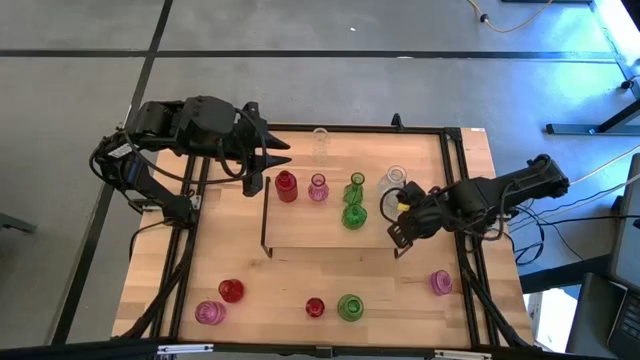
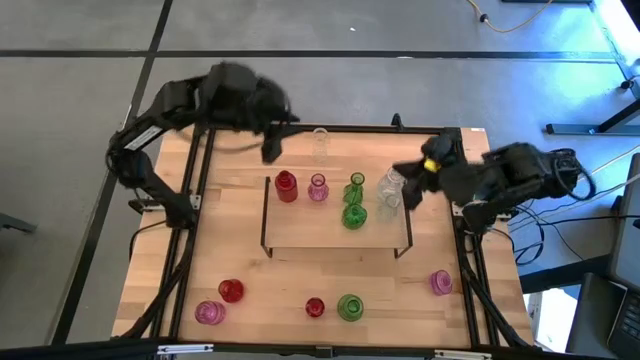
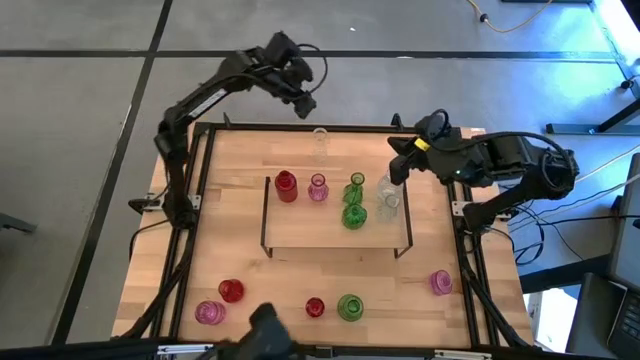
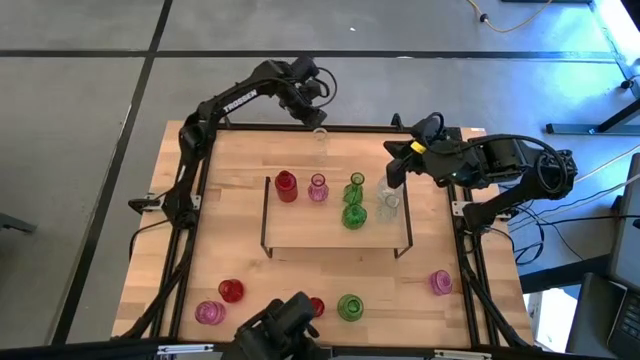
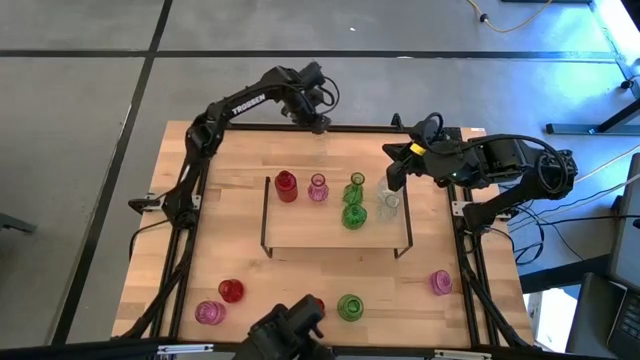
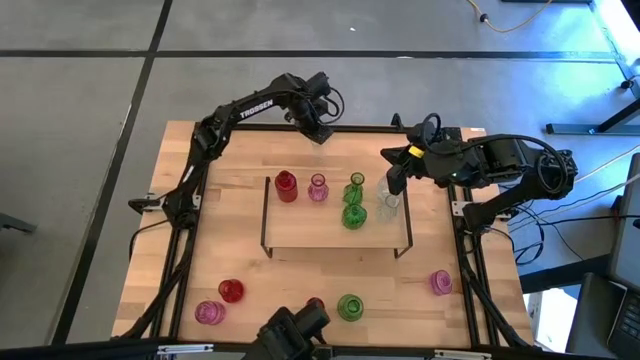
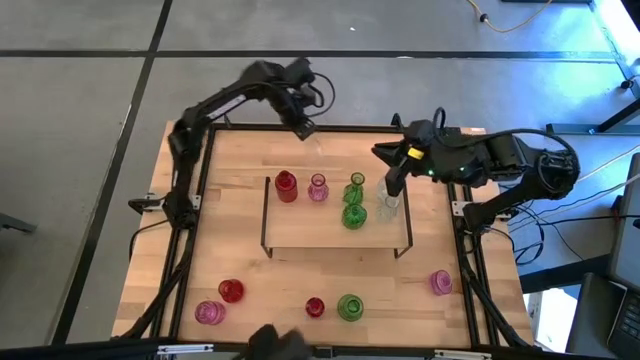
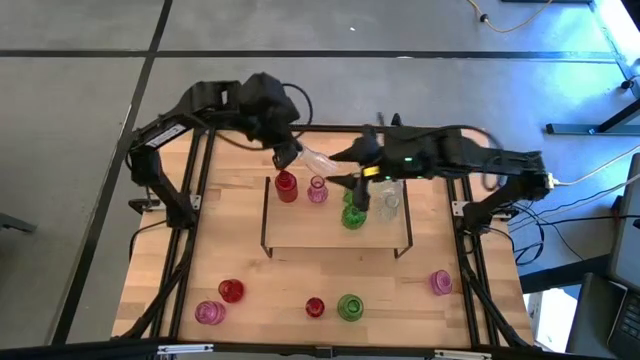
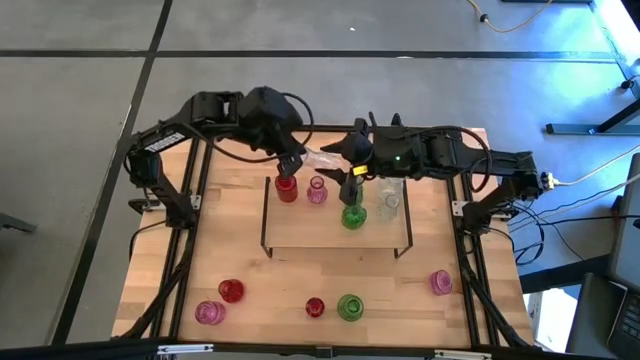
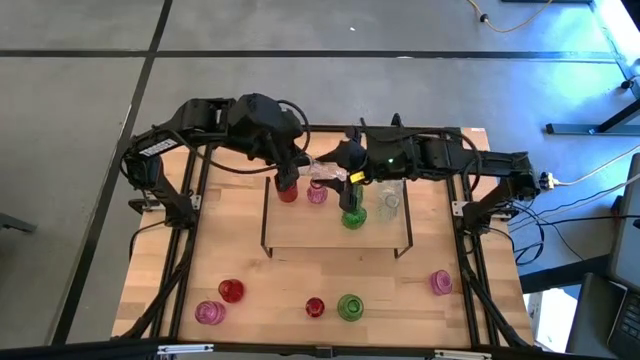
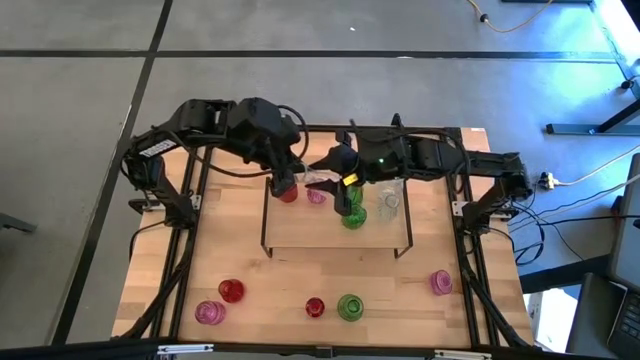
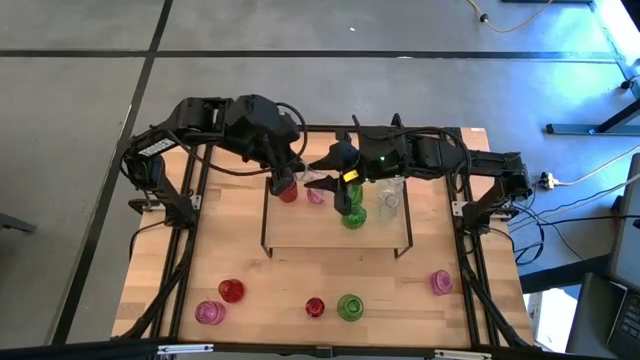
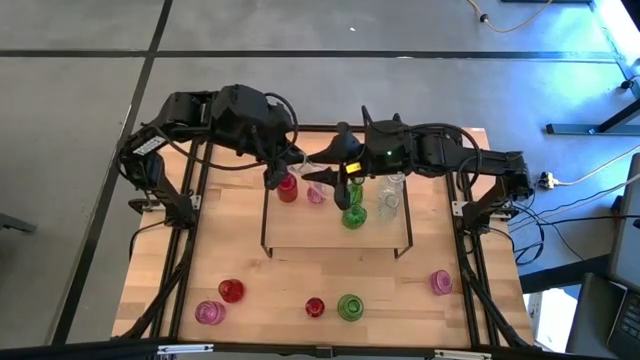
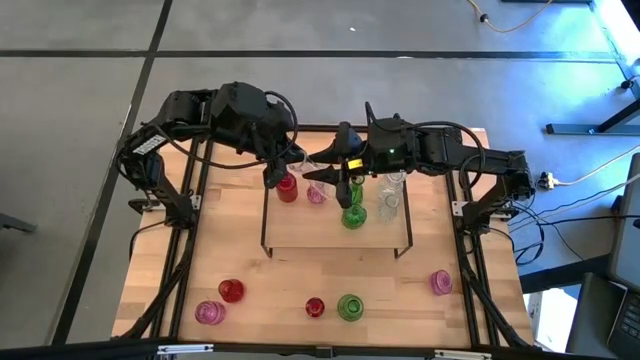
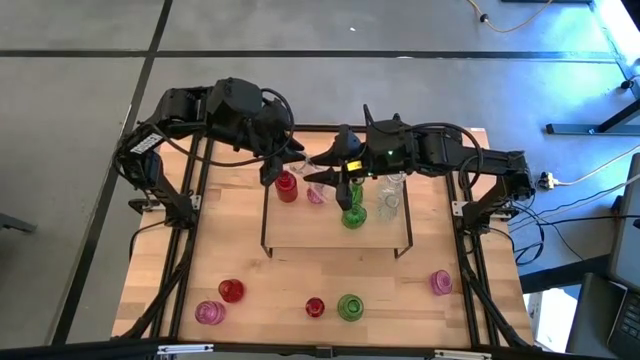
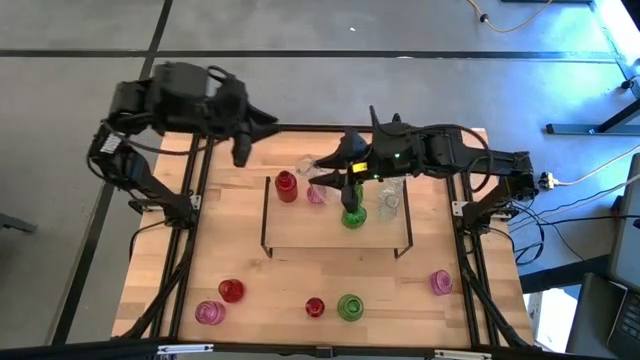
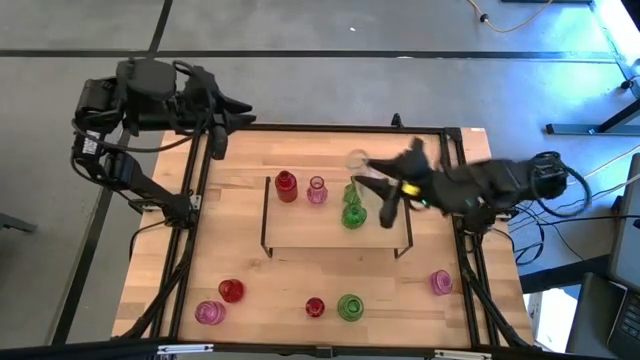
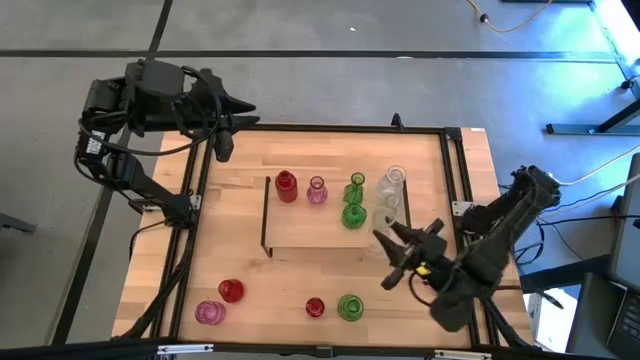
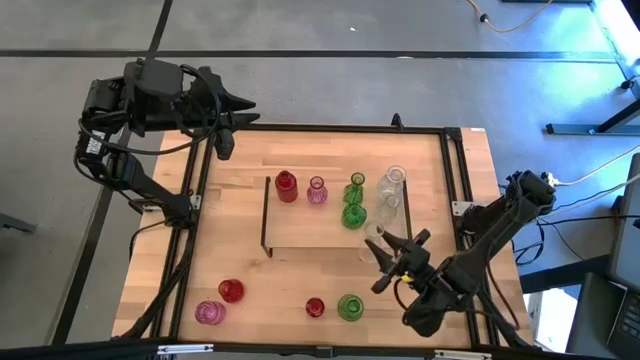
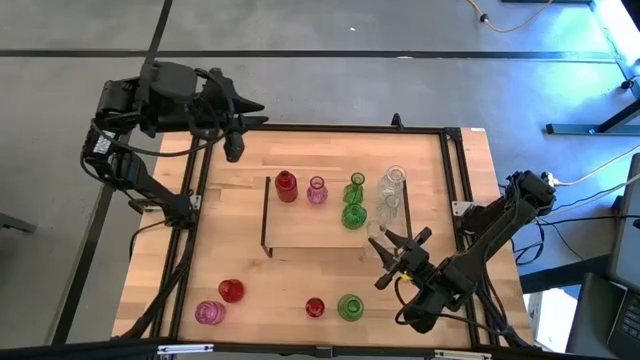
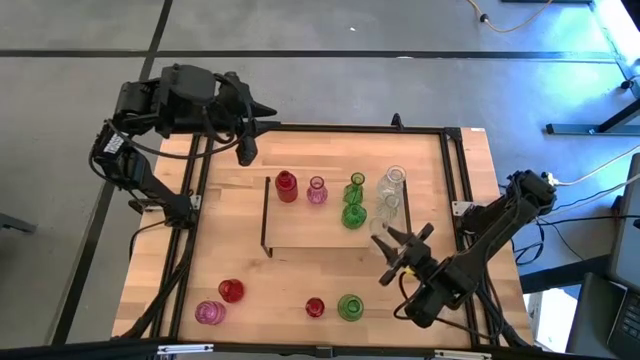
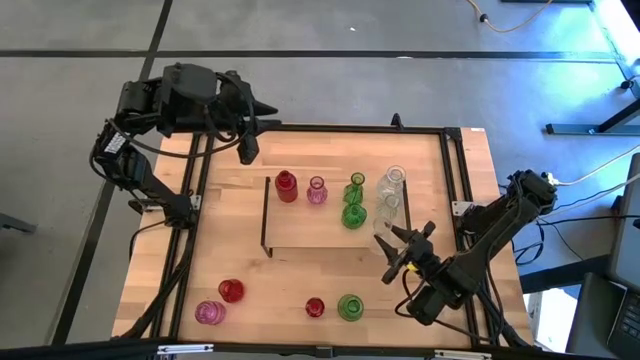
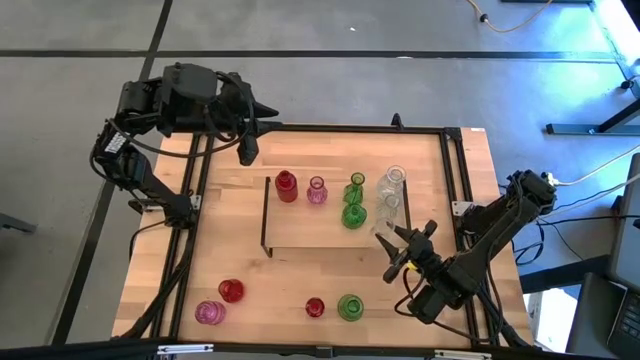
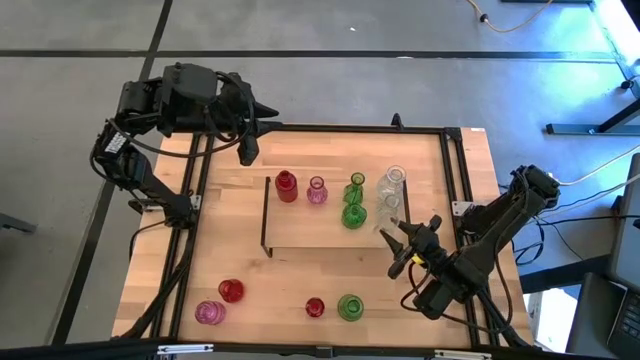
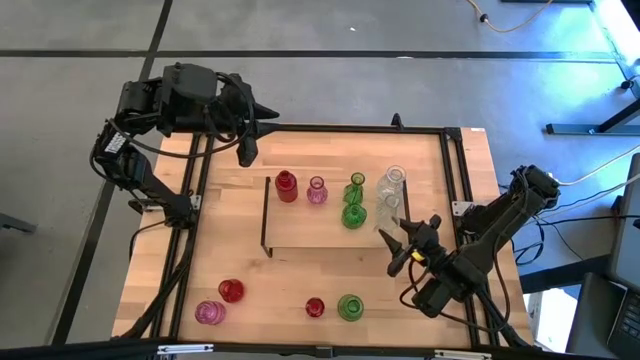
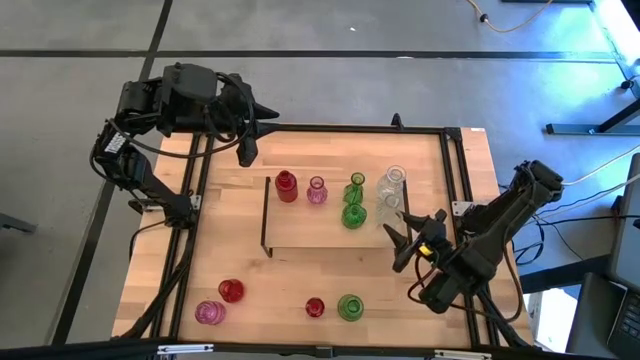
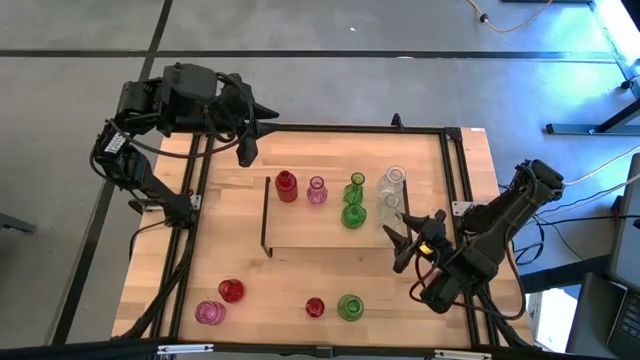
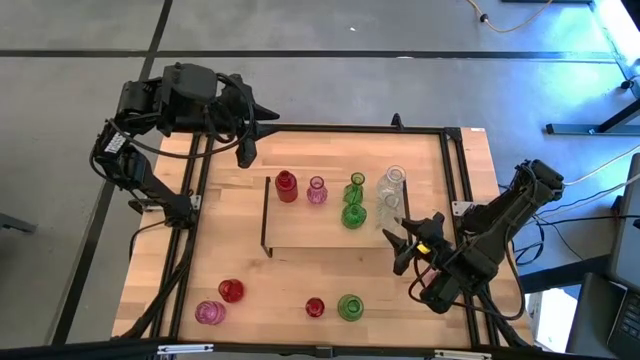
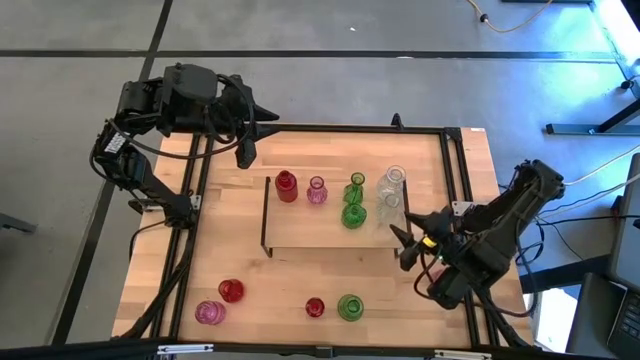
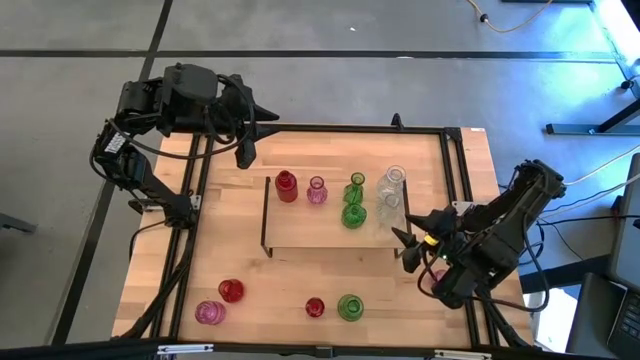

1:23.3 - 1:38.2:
Task: sort vases onto shelf
Put the transparent vase on the shelf aligned with the other transparent vases

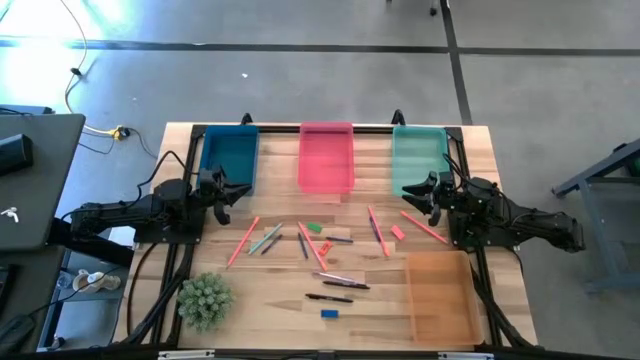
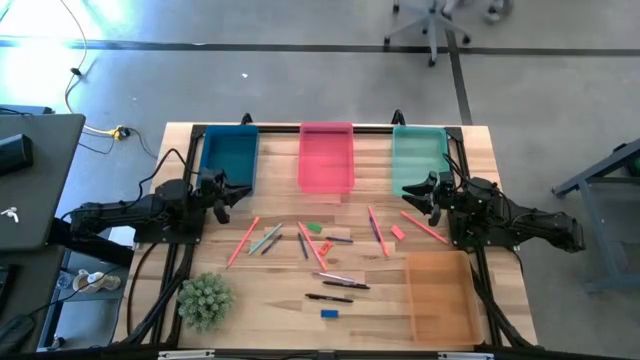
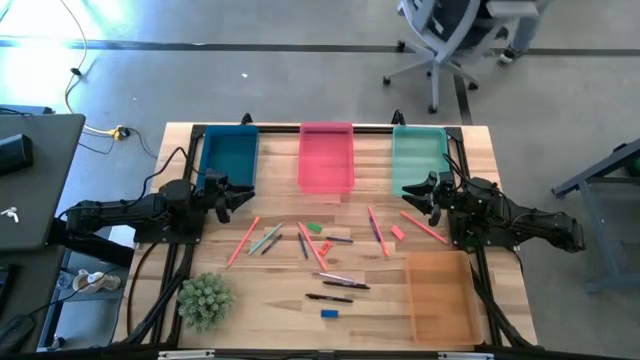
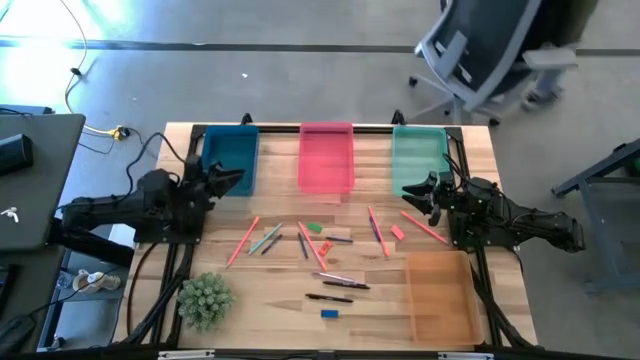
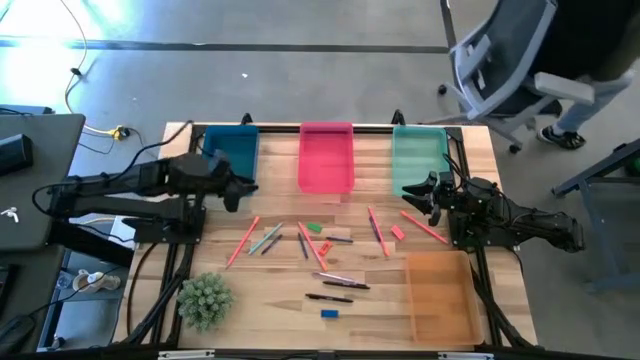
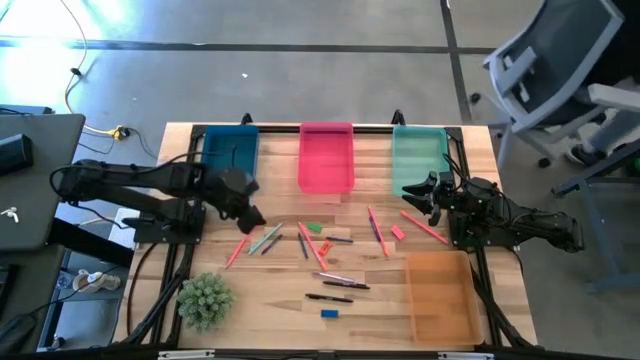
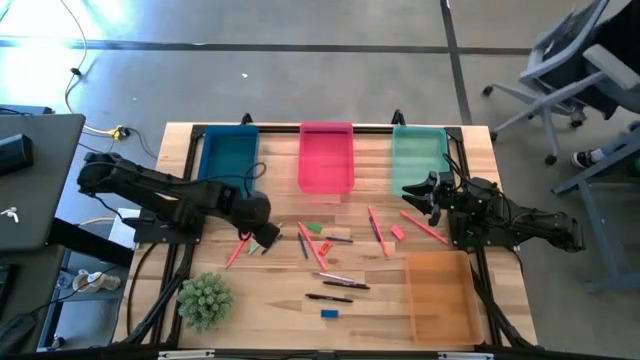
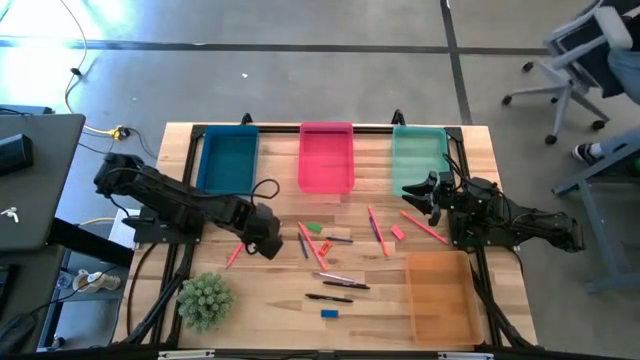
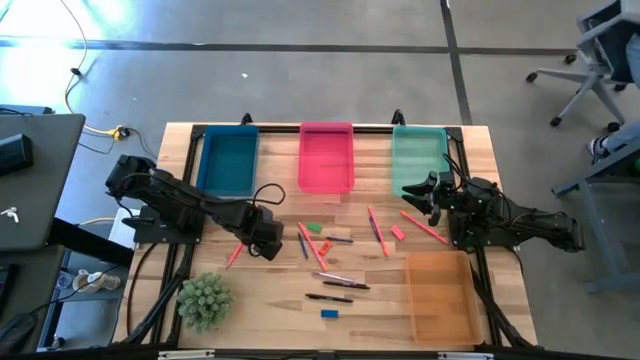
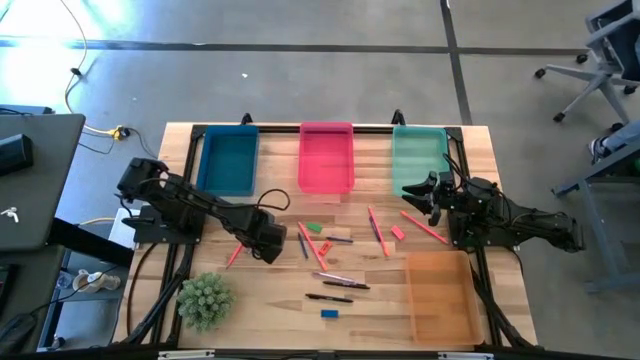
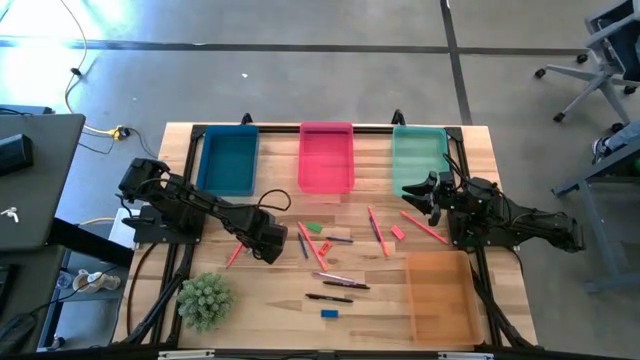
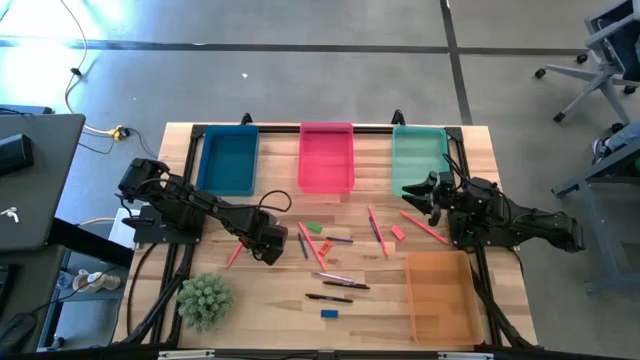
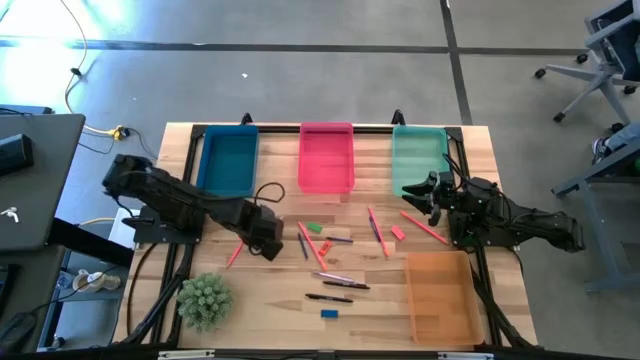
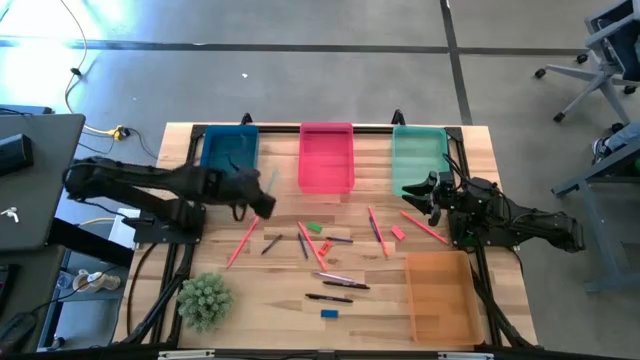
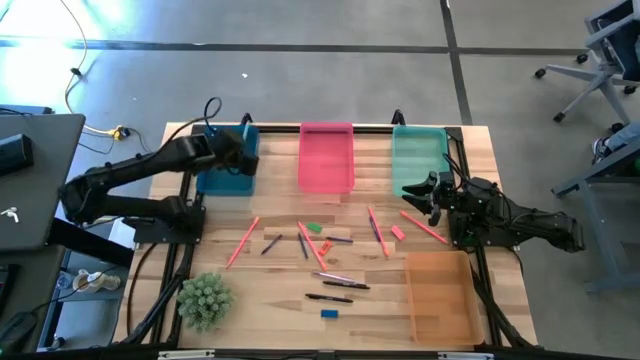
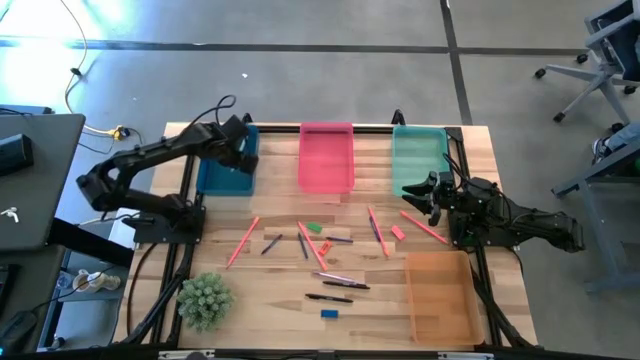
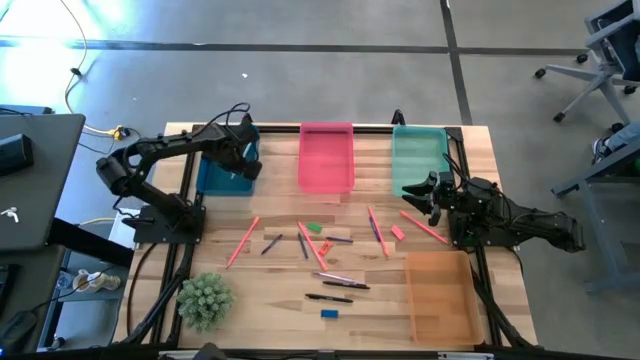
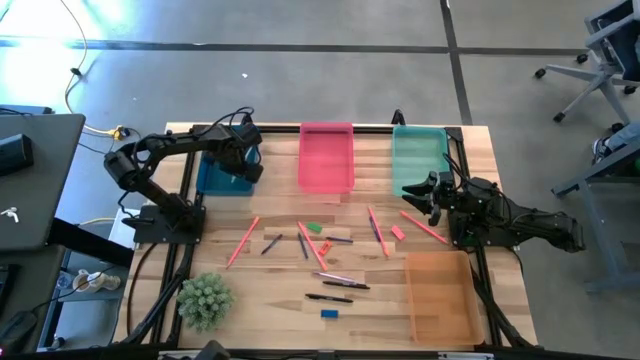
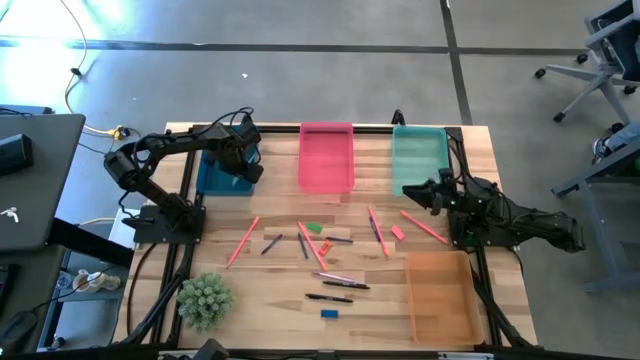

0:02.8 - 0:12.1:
Task: Sort crayons/erasers/pens/pencils in bins
Put the blue pen into the blue bin
